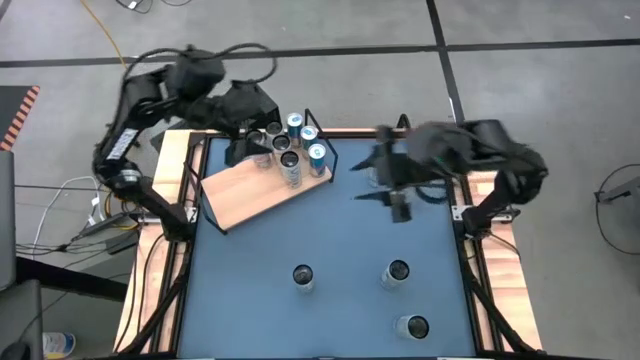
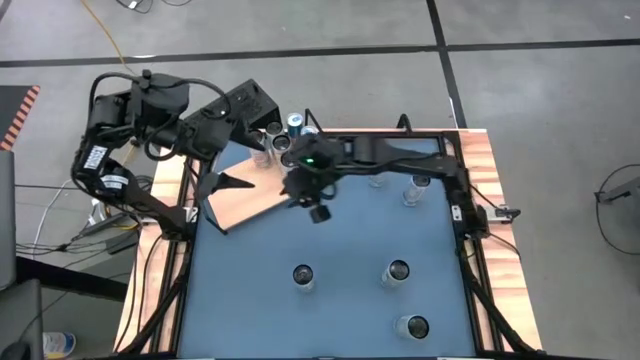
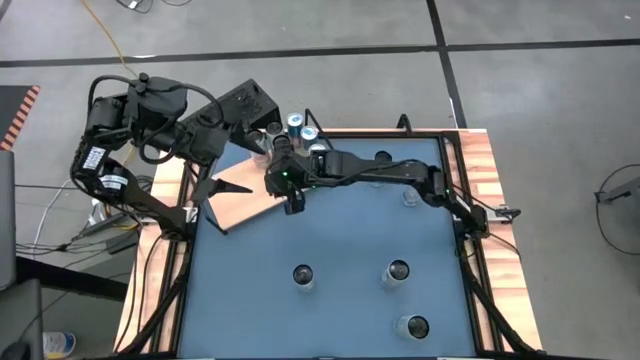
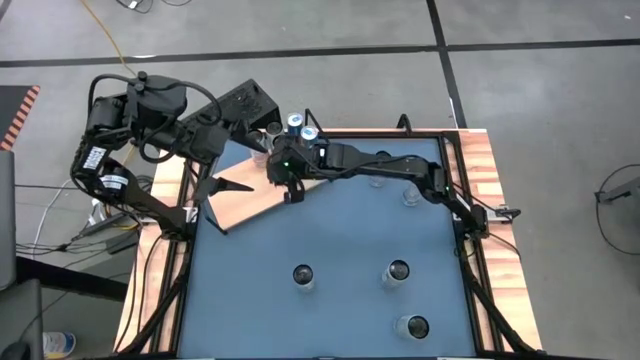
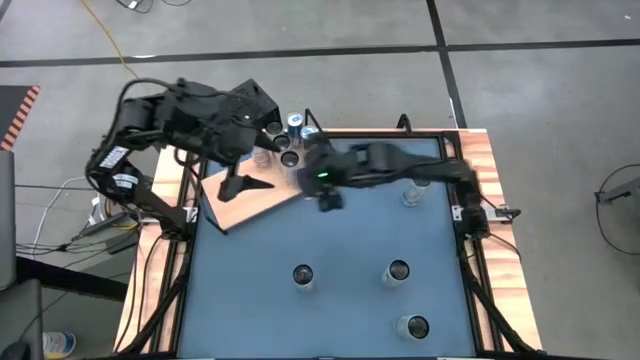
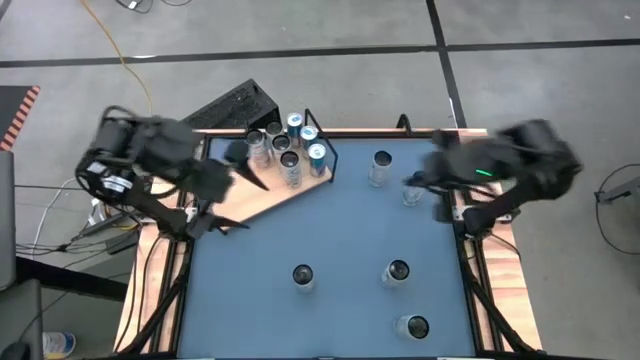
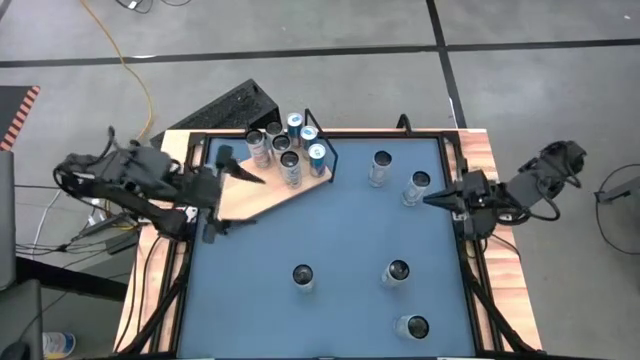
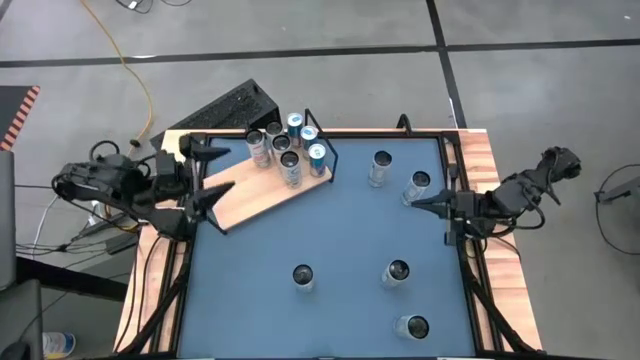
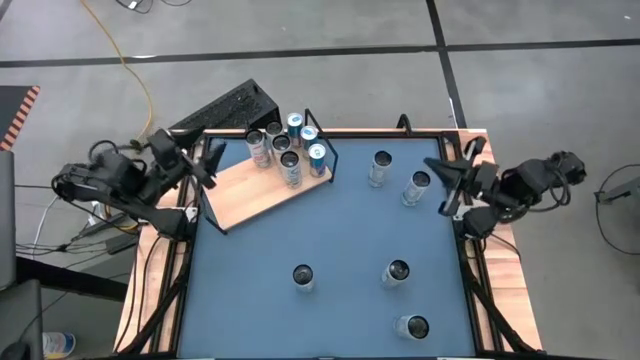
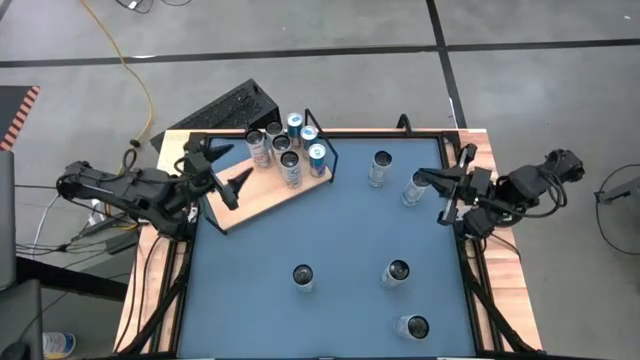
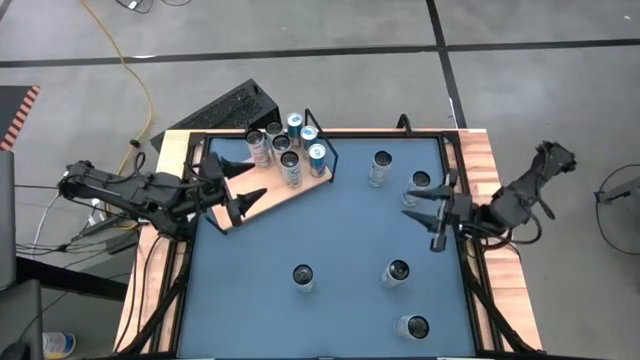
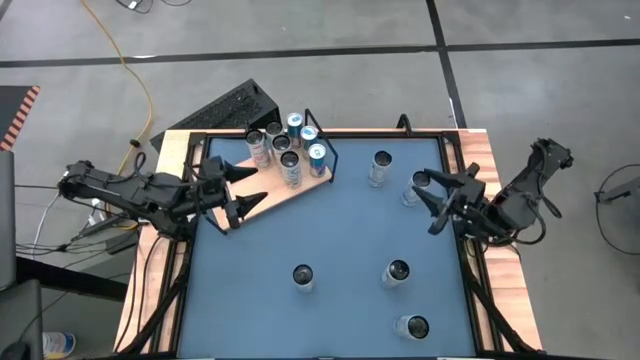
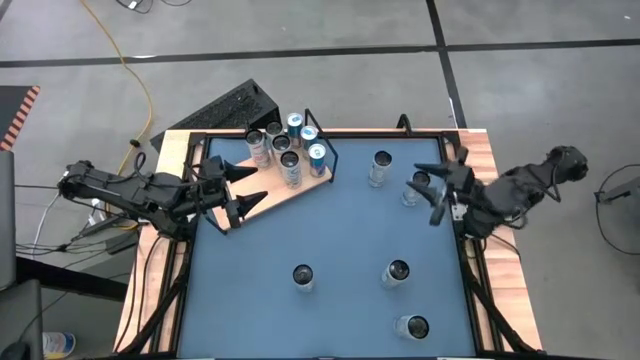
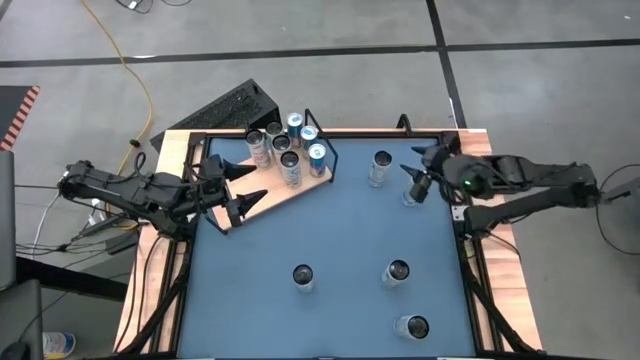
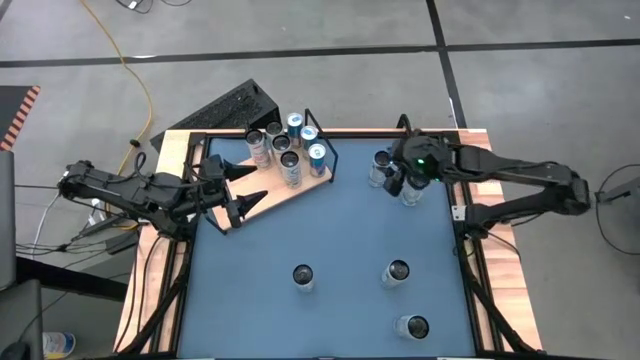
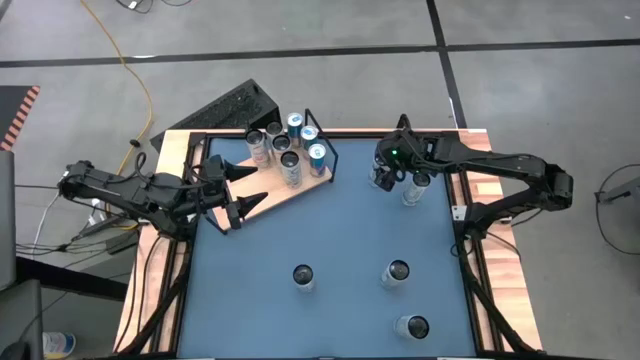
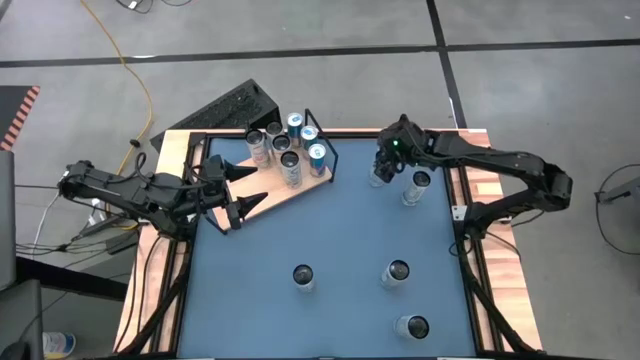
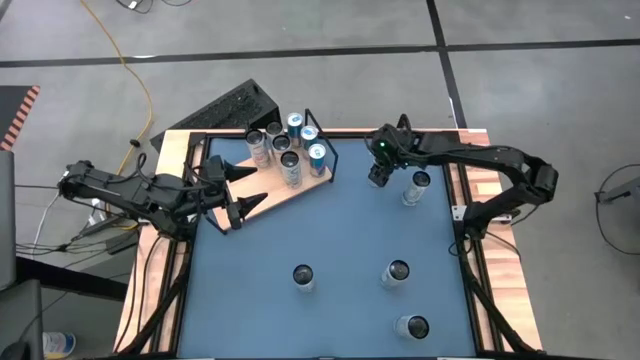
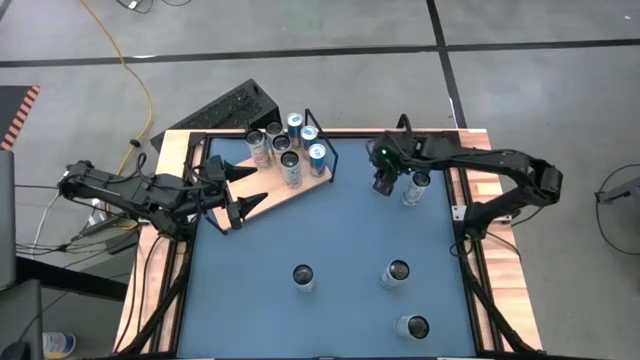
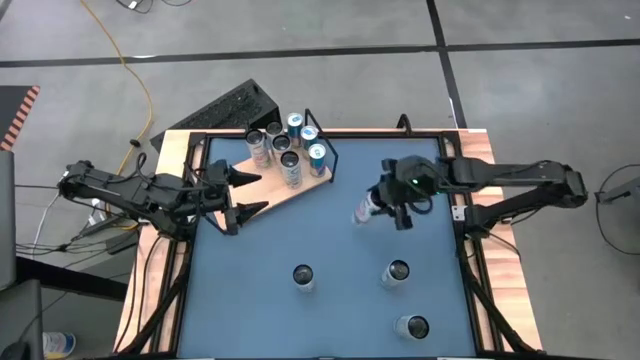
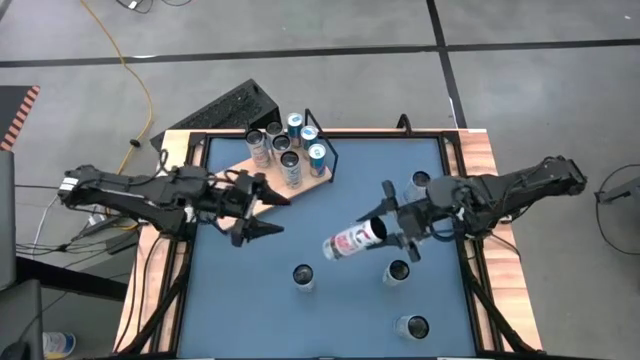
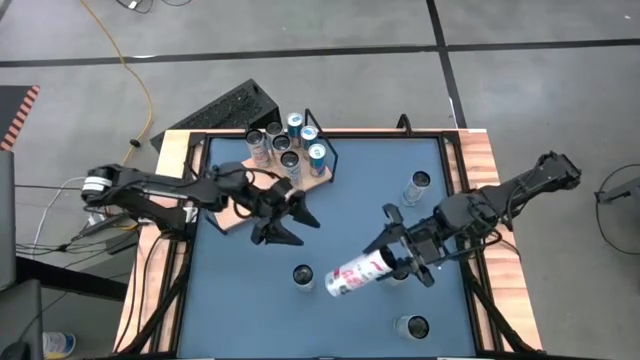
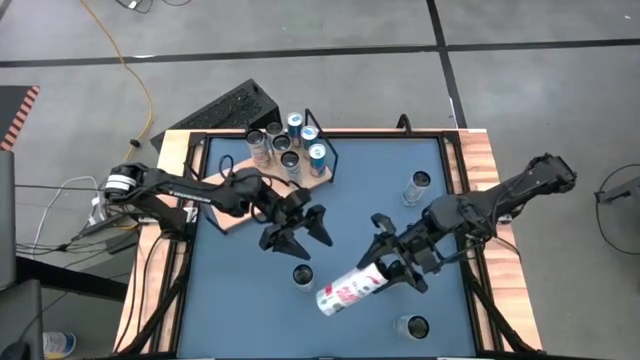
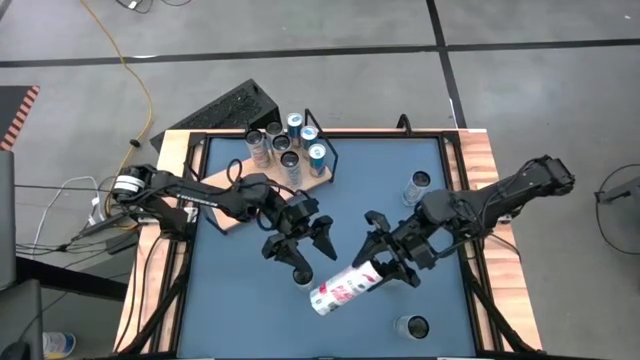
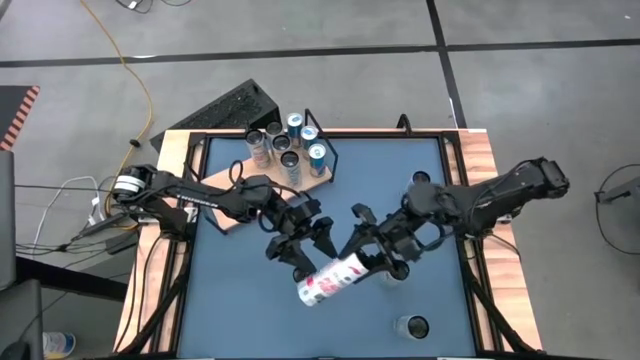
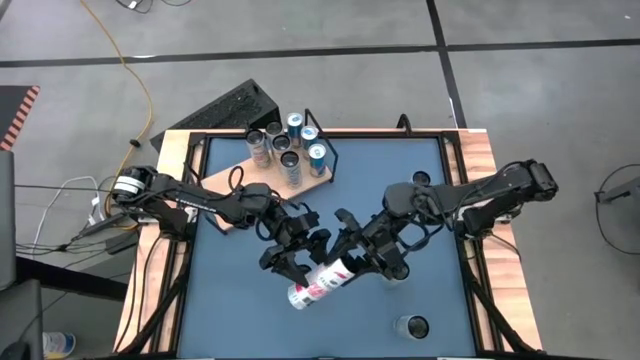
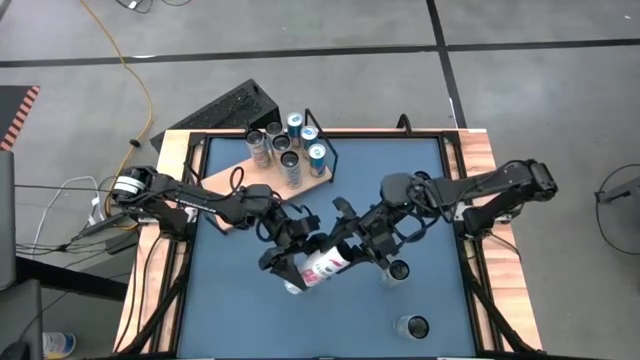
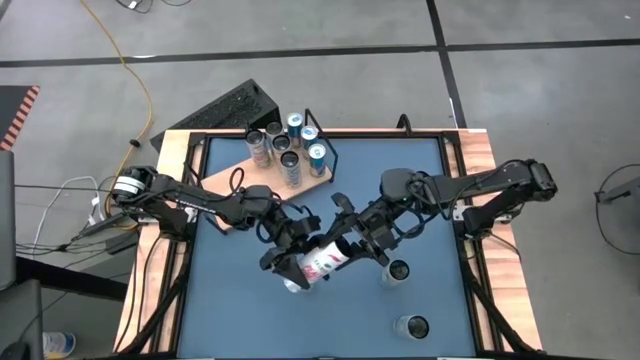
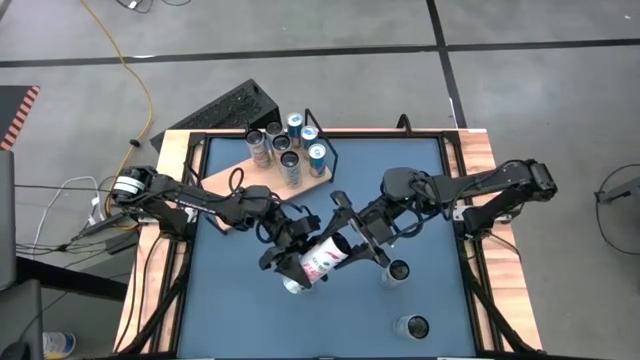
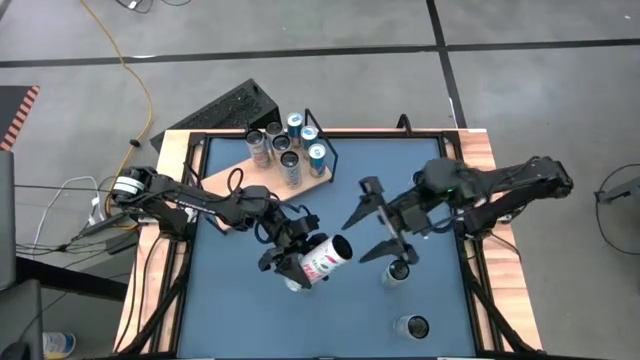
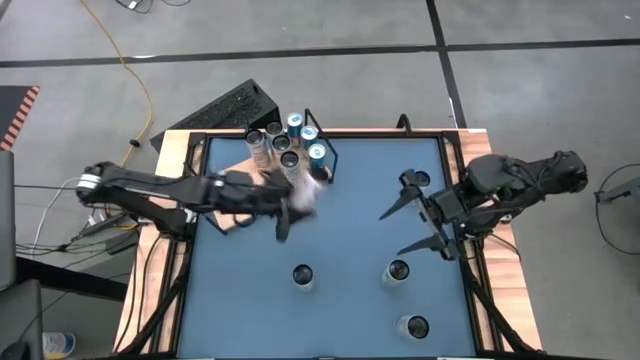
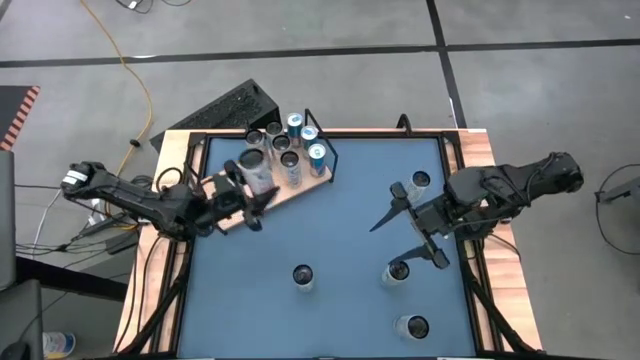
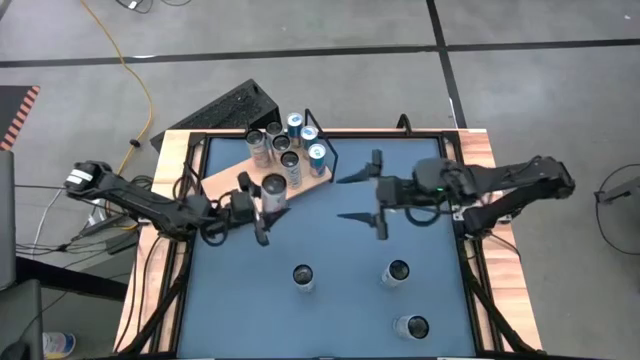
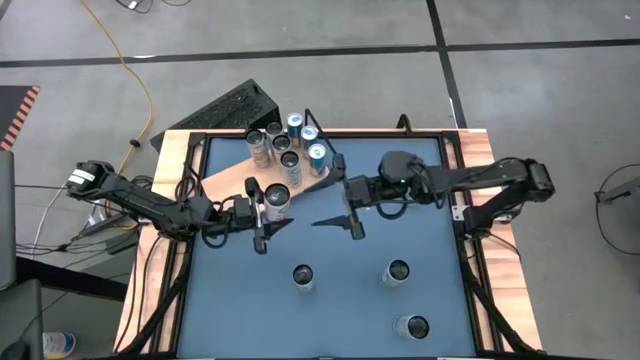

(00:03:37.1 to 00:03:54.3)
Task: Place canned beverage on shelf
Put the top white and pink soda can on the shelf aligned with the other white and pink soda can

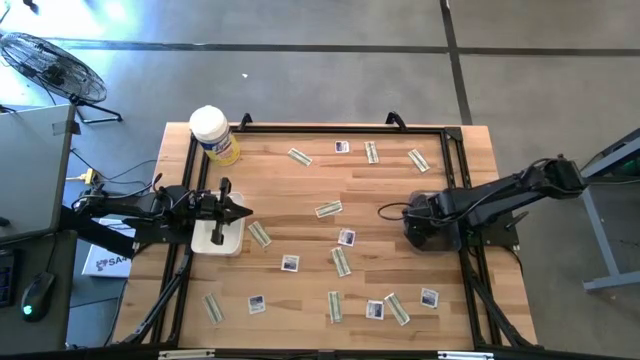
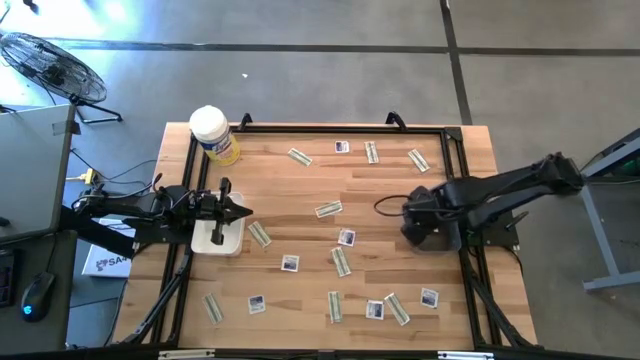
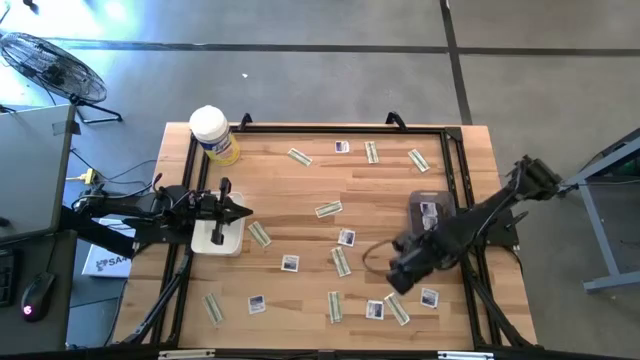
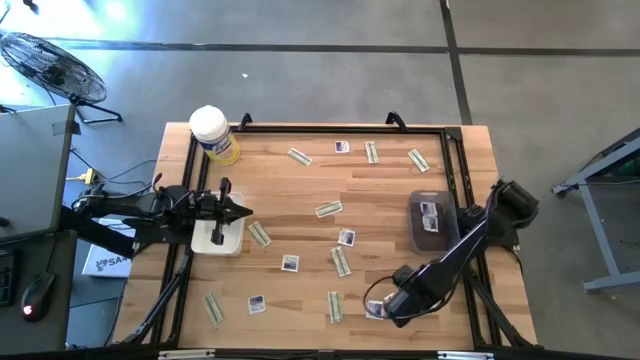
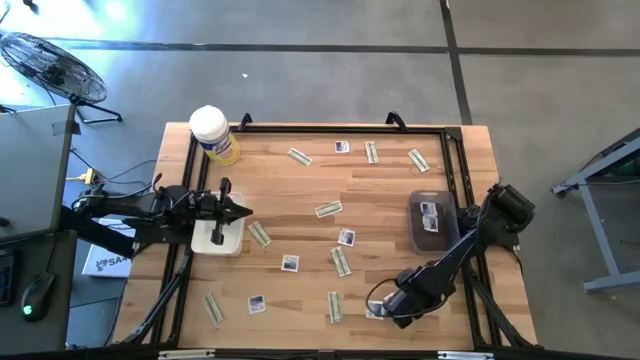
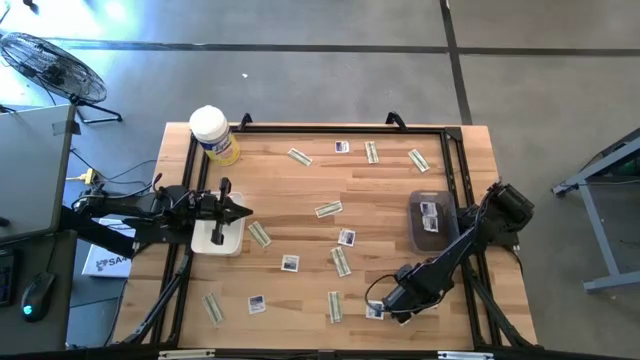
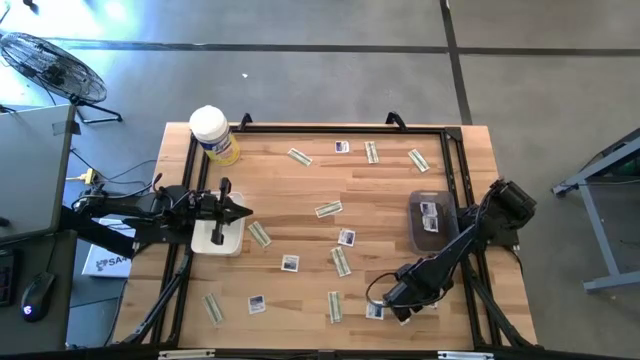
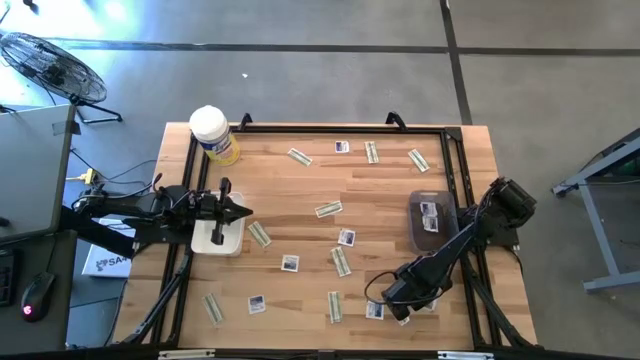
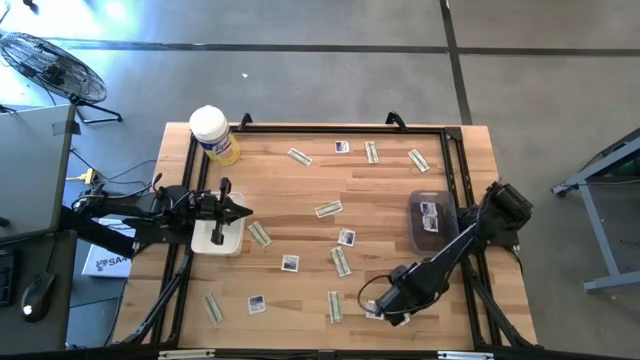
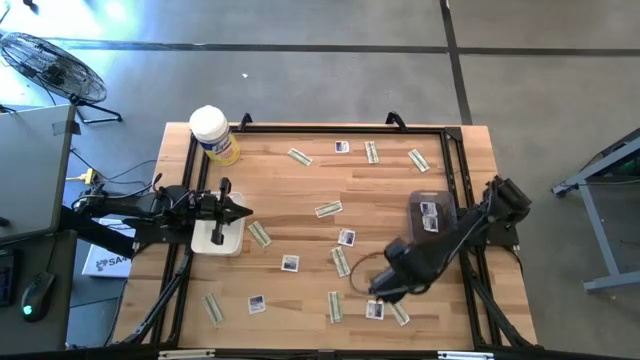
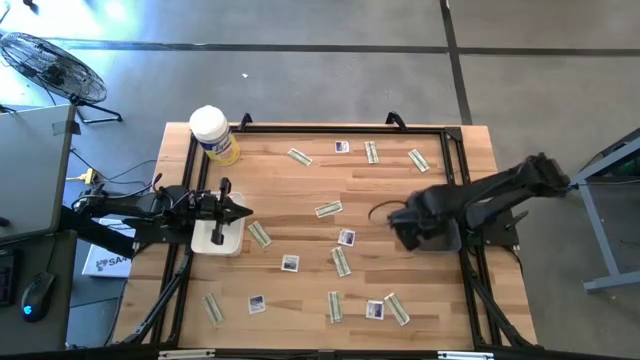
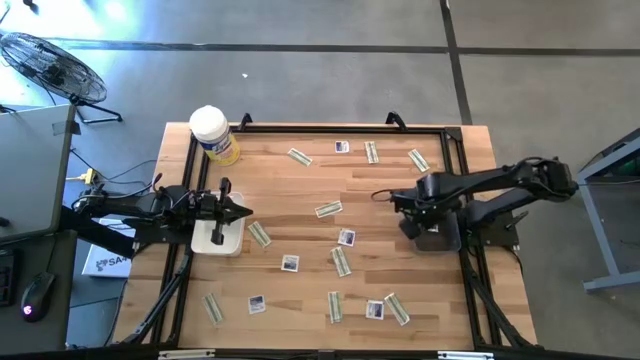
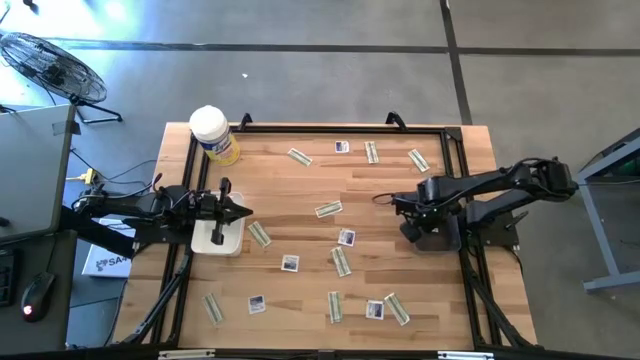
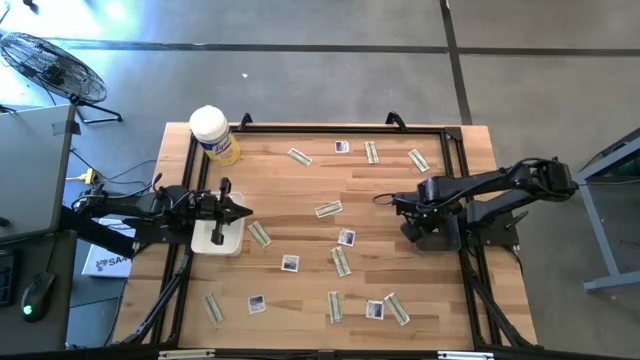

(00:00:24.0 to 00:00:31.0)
Task: Pick & Place First Aid Supplies
Put the blue alcohol pad into the black bin
